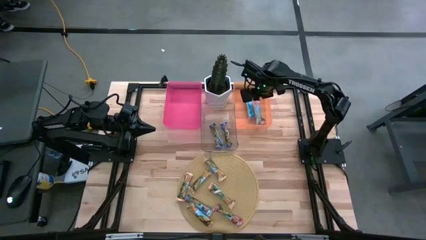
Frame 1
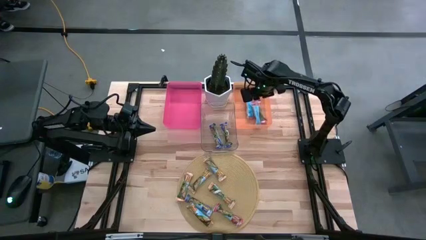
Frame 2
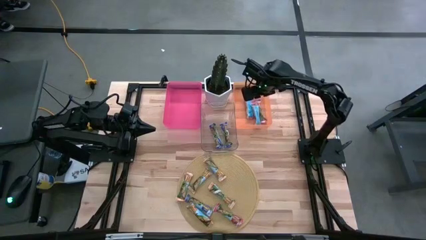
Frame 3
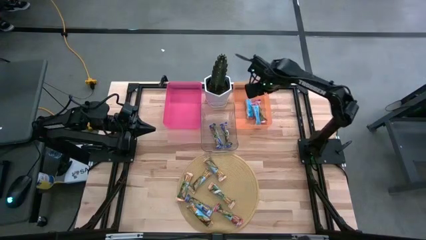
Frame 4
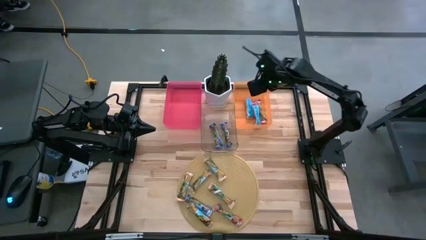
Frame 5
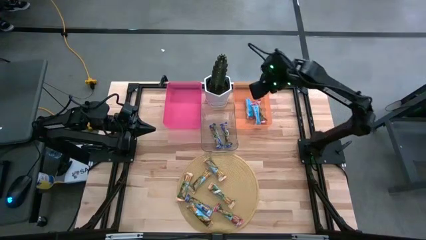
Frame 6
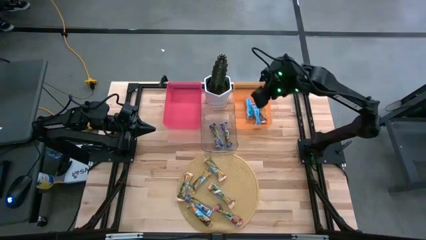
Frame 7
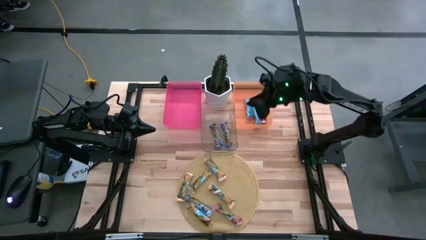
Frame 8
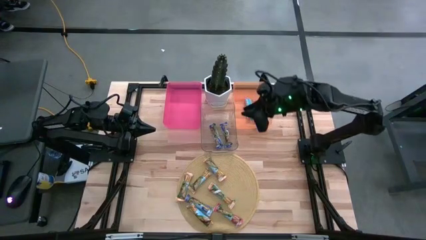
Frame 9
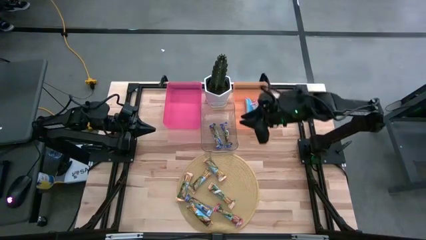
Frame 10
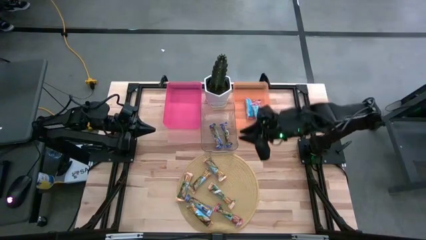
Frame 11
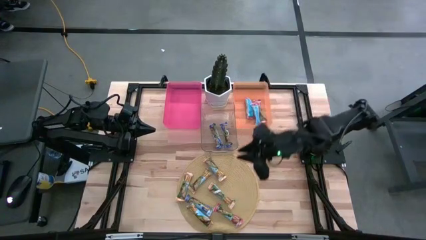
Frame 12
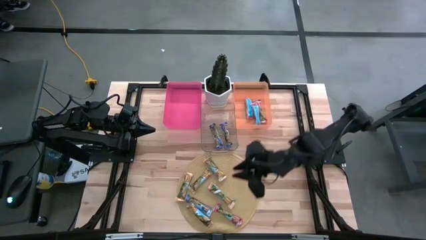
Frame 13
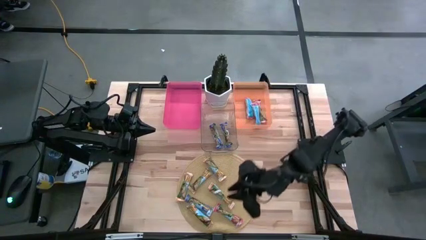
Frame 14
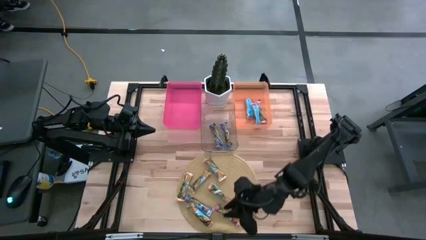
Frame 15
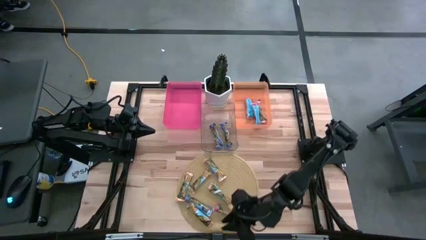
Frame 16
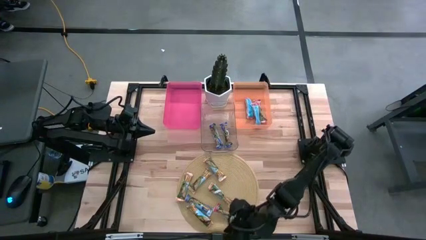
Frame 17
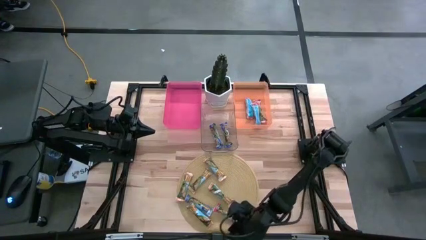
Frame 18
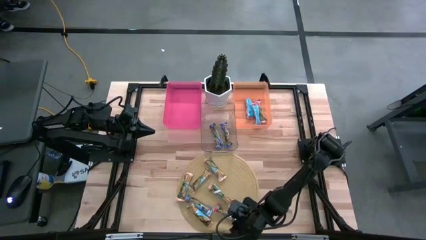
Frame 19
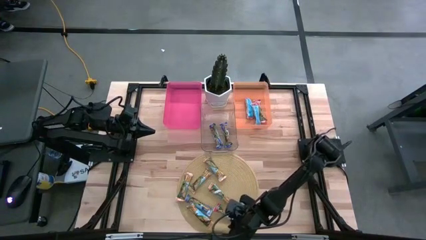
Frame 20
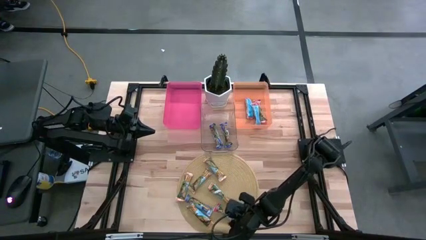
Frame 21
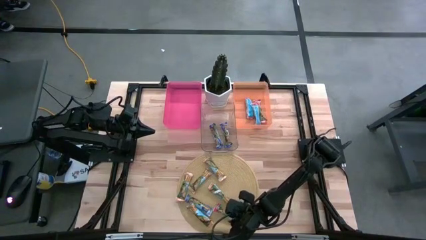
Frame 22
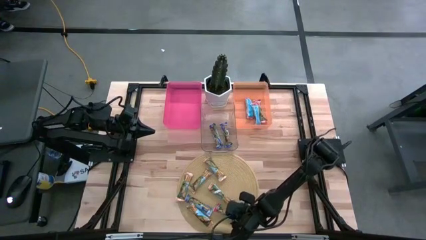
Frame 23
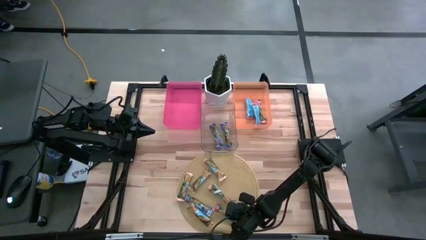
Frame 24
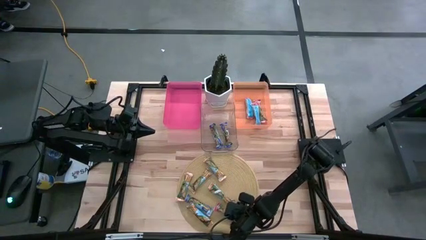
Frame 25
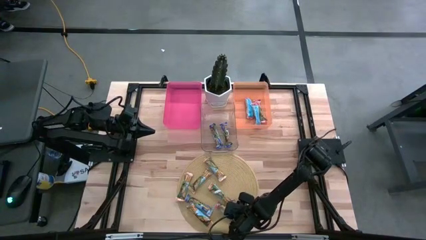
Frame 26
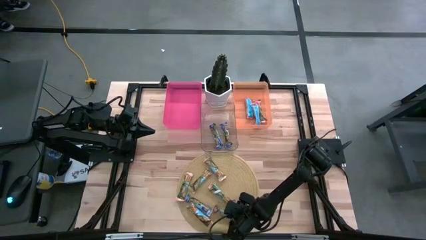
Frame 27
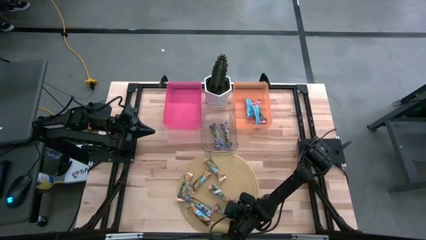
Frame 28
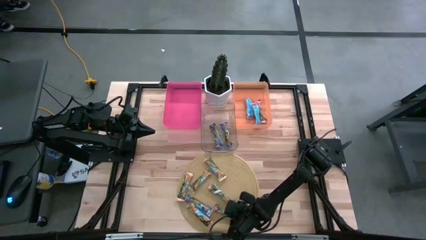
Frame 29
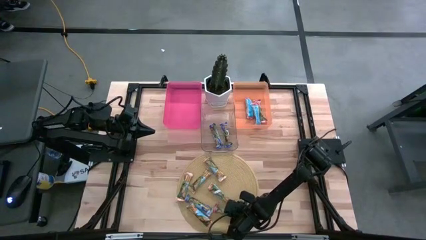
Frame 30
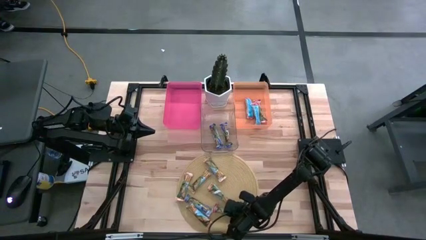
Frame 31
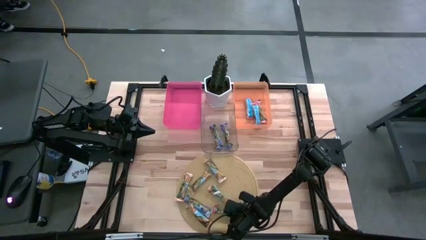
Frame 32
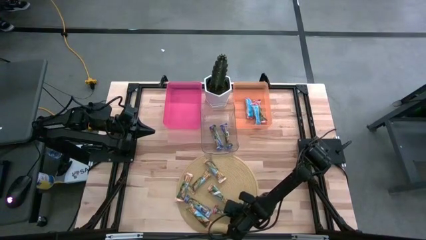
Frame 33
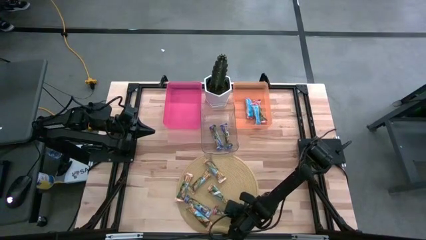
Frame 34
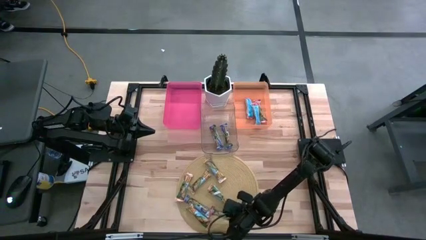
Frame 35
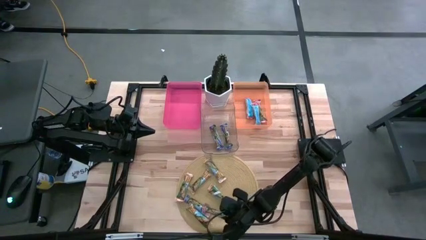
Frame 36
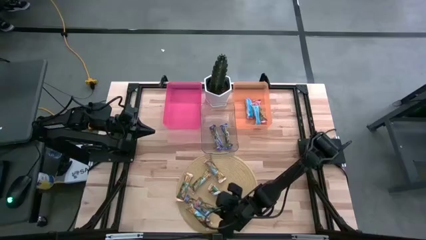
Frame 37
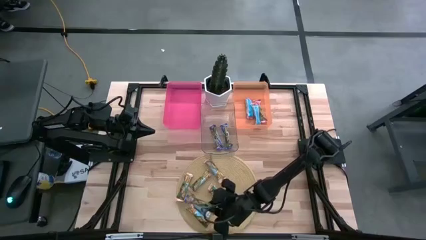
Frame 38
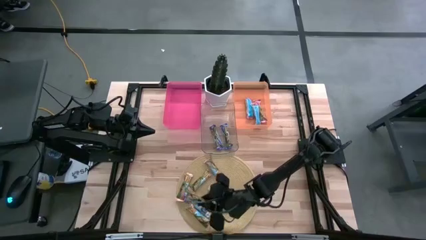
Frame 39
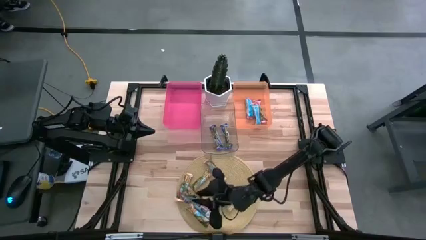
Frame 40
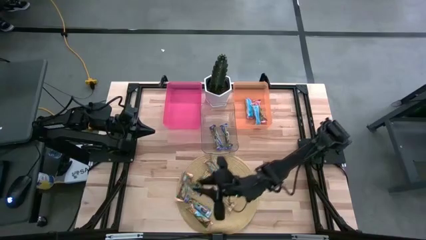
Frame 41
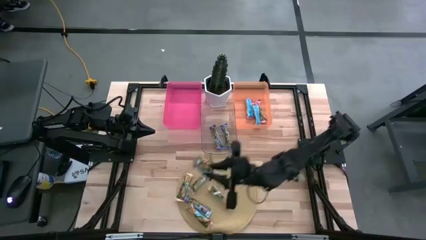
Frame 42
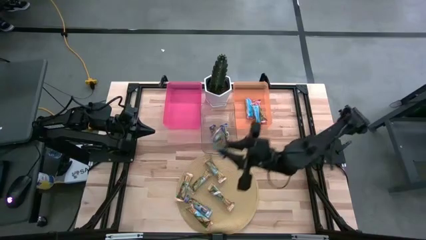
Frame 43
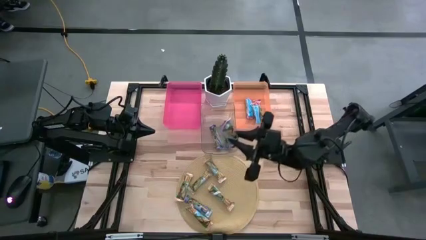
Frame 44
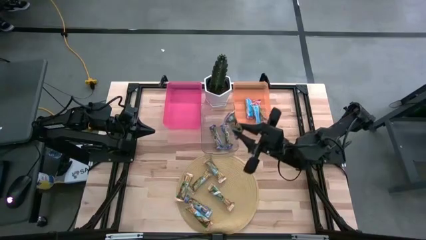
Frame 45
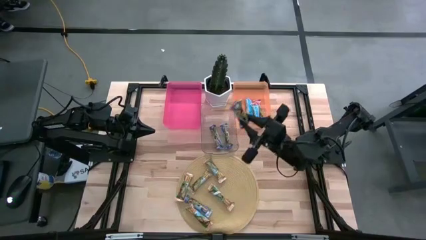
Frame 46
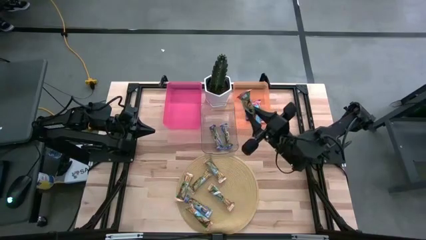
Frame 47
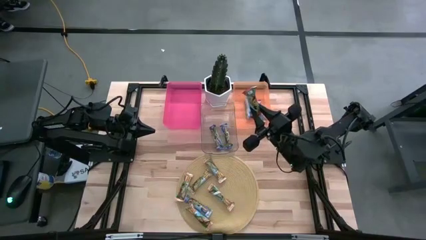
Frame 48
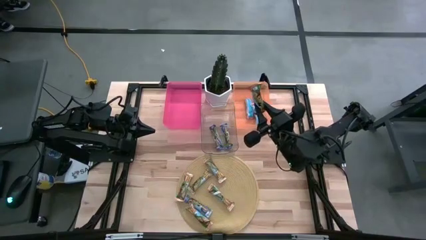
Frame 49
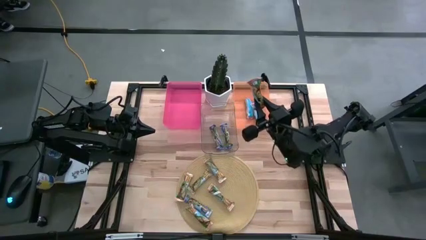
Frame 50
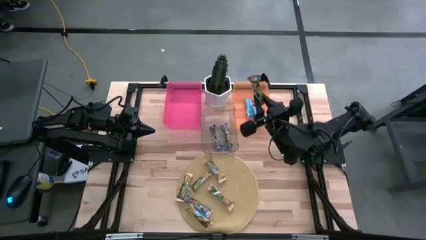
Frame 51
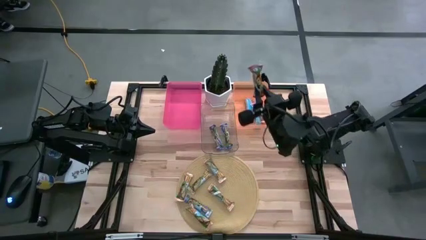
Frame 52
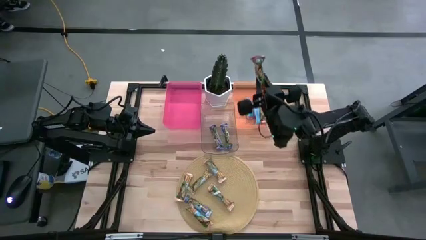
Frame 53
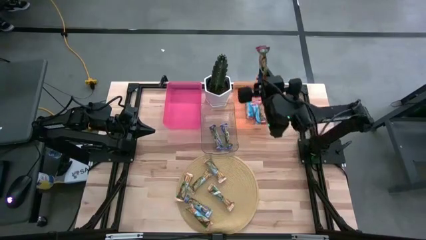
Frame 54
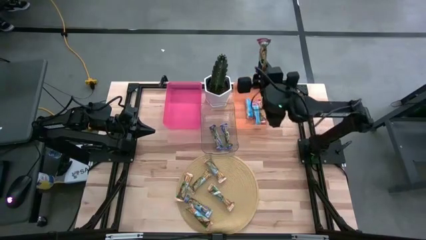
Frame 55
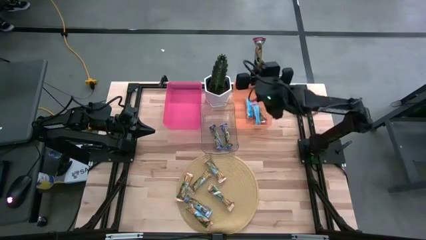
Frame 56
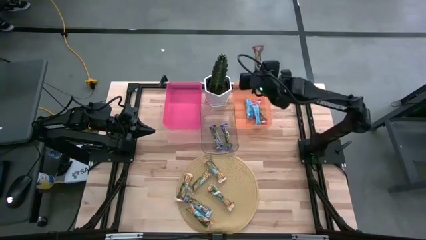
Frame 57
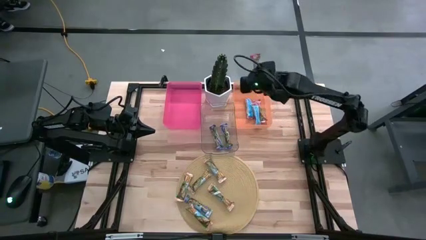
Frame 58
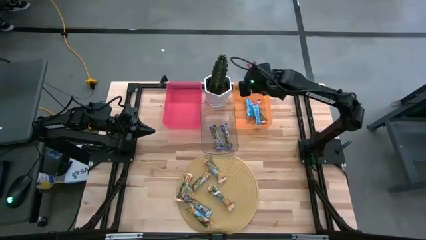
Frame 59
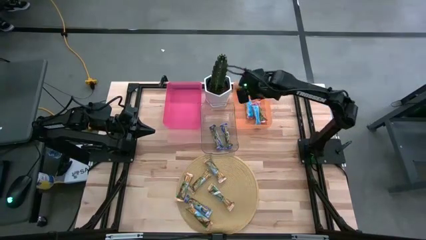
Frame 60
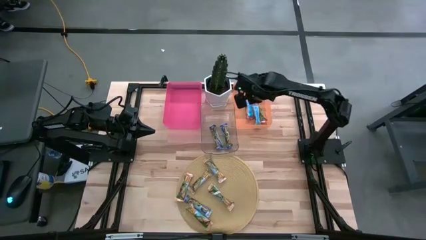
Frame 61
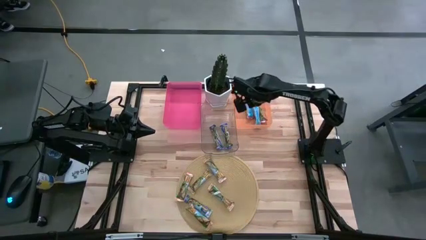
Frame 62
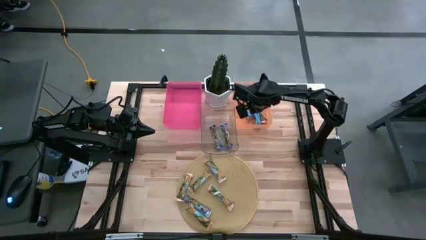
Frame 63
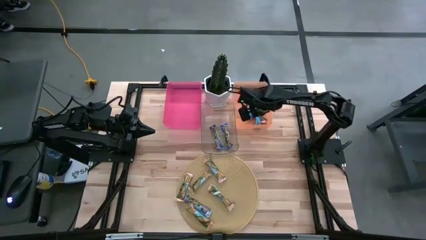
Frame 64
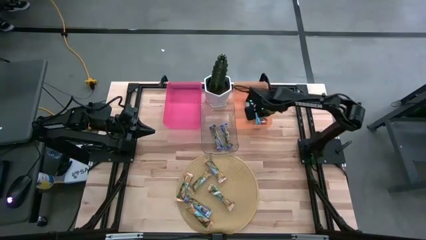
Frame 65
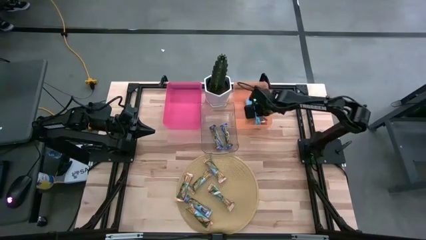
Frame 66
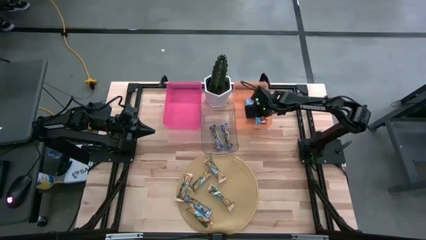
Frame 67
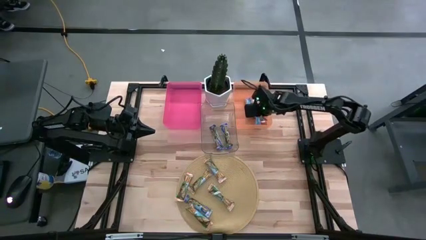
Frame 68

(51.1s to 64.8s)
Task: Pick and place Granola Bars by type
Put the red granola bar into the orange bin

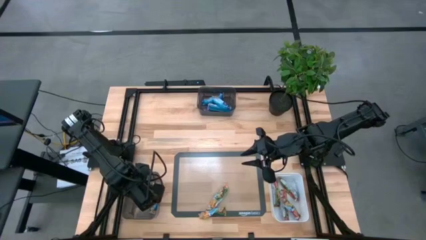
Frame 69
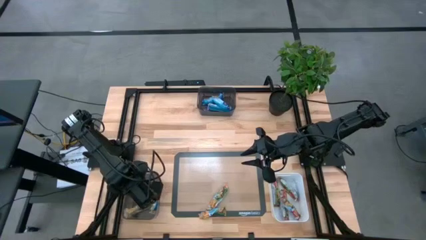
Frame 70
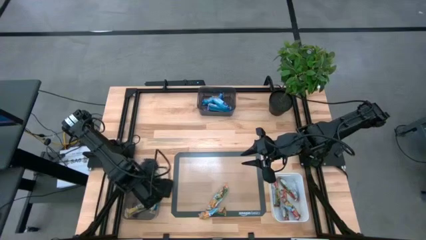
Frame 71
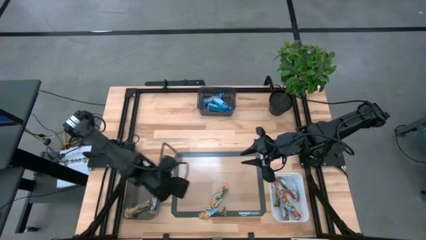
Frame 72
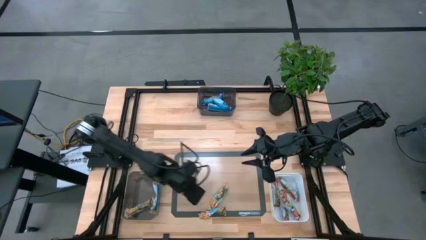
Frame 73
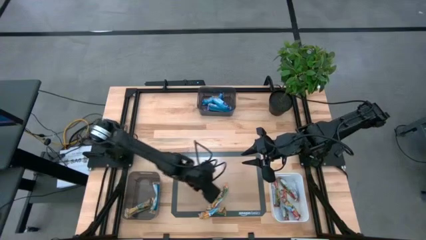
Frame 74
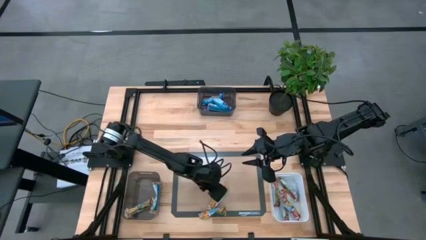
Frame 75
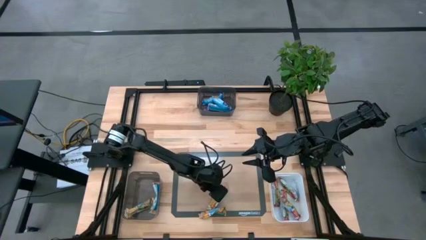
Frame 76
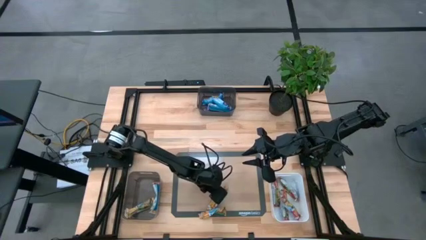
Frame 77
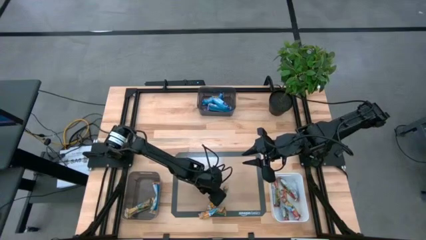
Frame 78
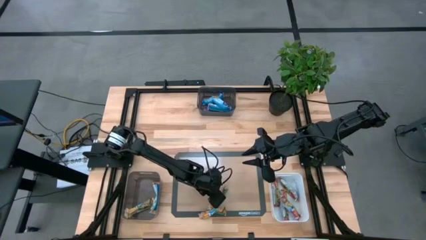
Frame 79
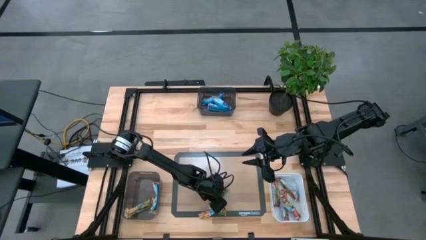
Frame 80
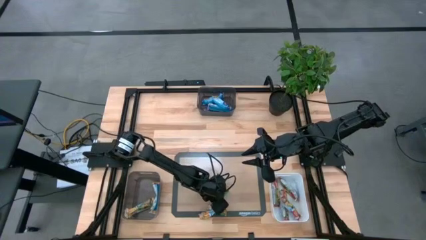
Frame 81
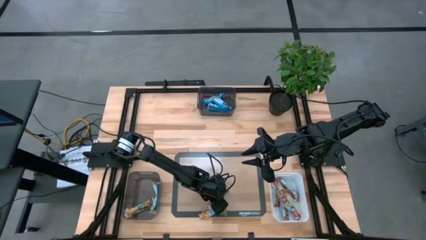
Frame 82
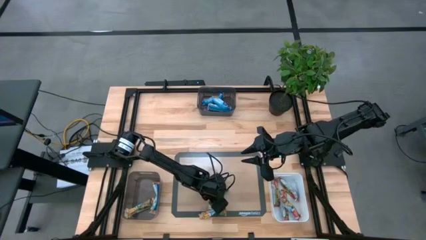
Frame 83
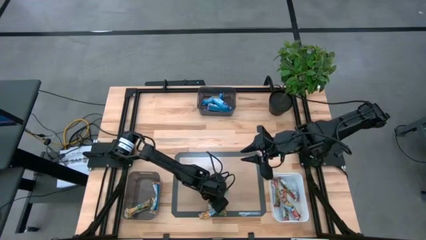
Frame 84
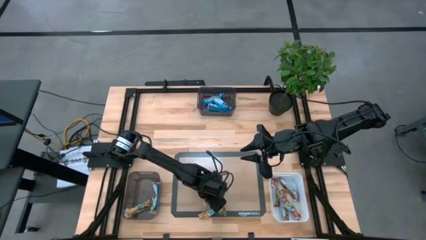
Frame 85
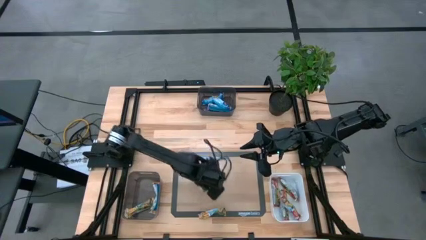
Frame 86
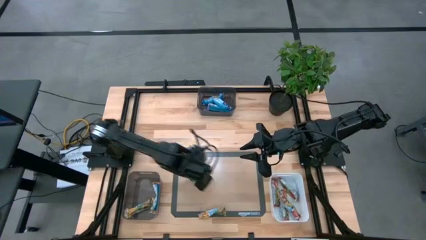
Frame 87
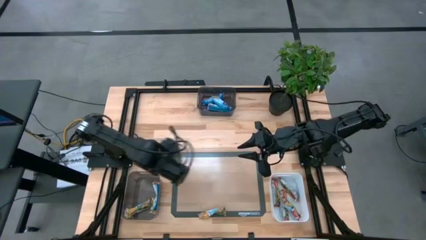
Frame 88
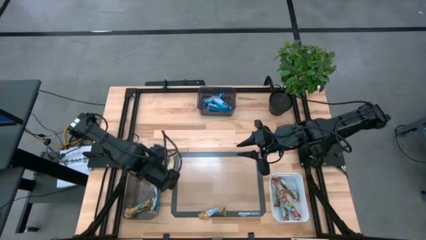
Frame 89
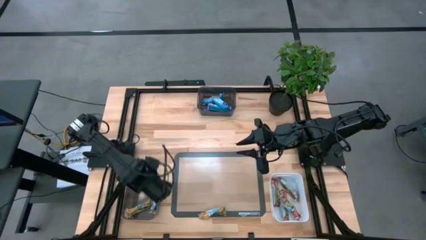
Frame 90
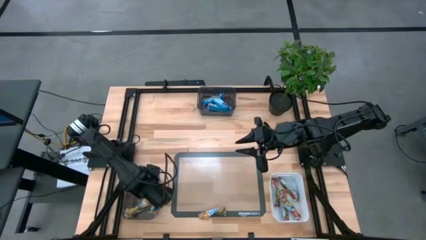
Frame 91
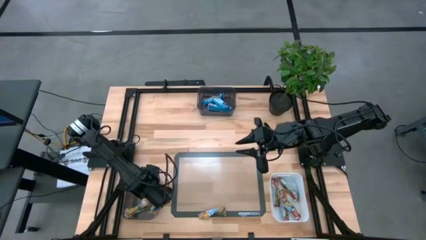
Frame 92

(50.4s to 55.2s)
Task: Pick and place Granola Bars by type
Put the orange granola bar into the bottom black bin
